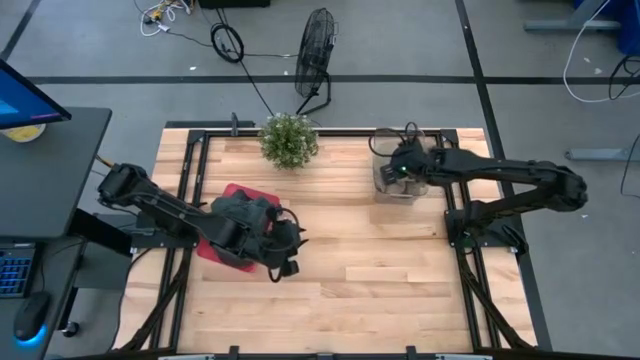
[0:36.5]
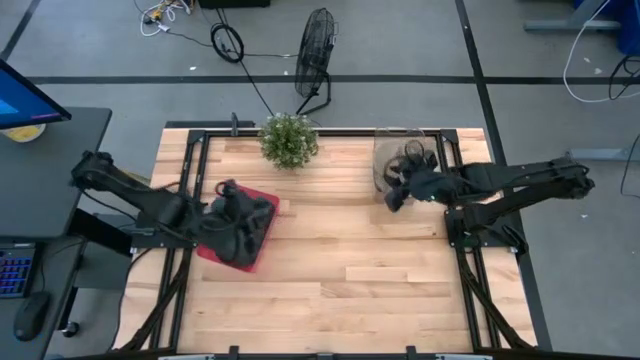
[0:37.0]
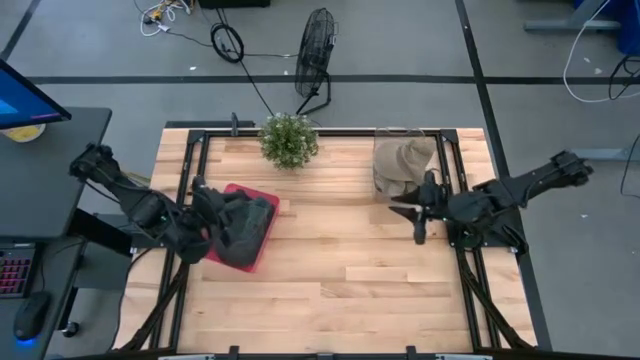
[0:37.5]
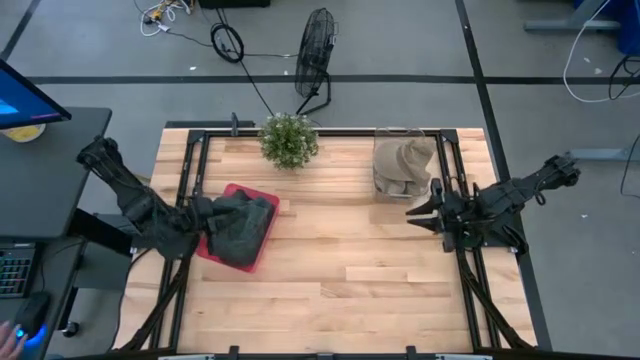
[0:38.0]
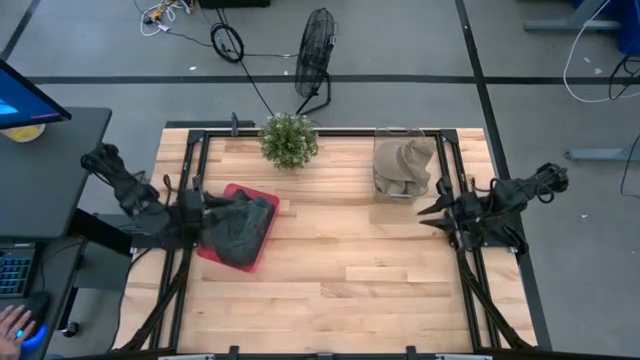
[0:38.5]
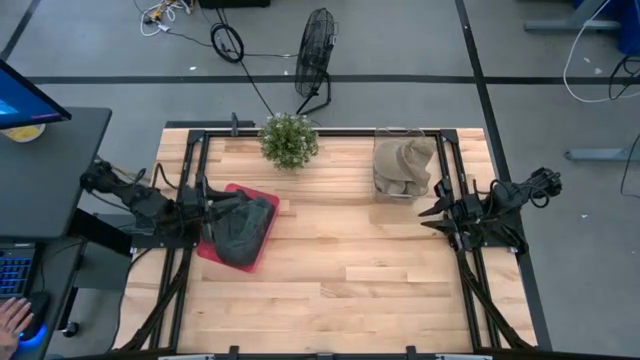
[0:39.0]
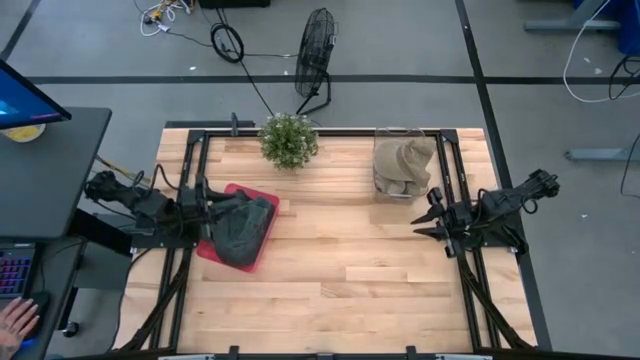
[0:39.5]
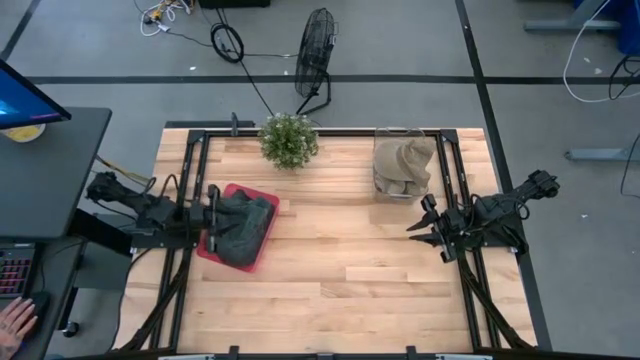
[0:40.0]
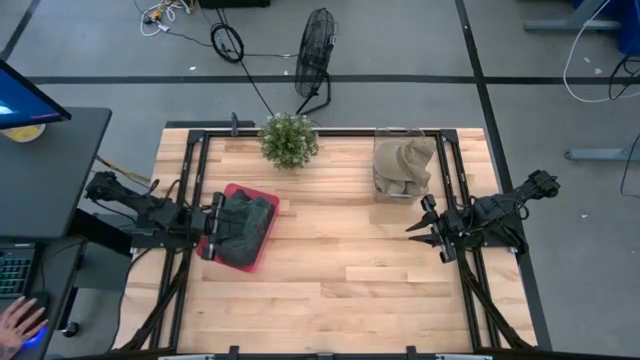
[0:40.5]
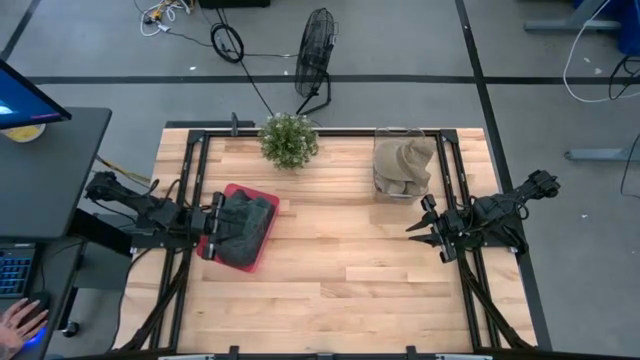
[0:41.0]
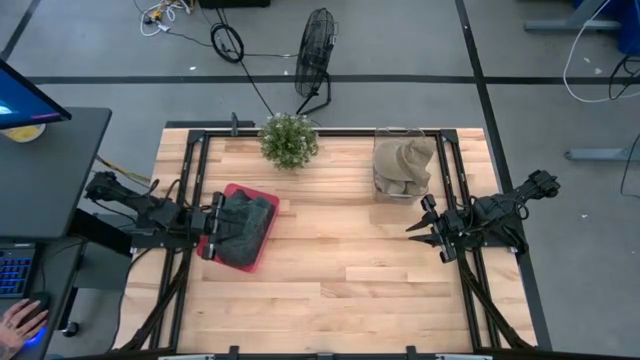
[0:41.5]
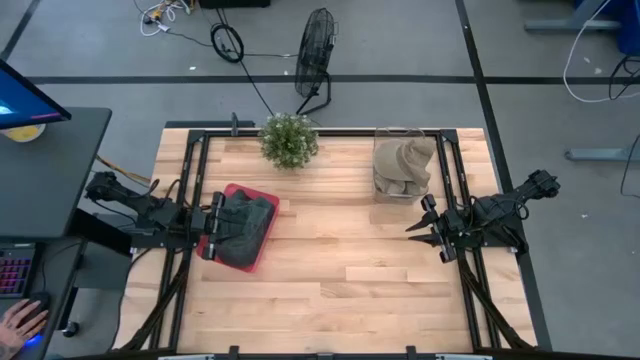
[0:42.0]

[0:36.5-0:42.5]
Task: Pick & Place hat
Return to Home Position

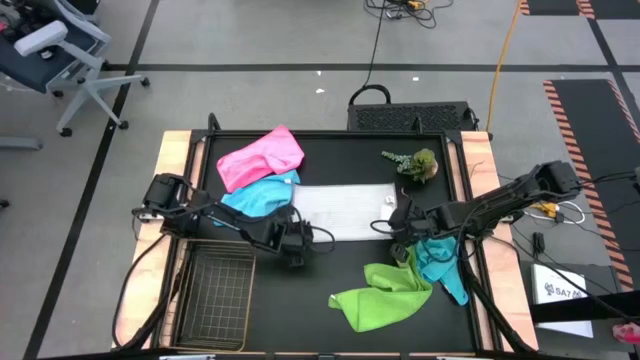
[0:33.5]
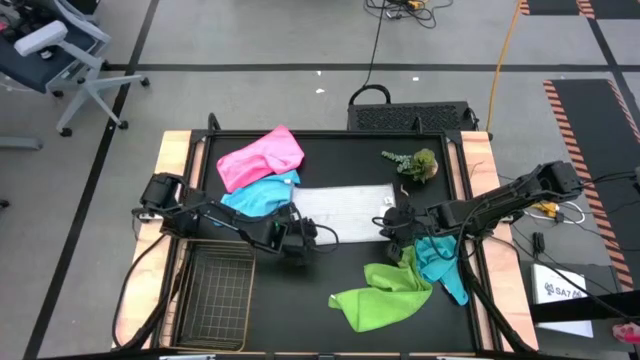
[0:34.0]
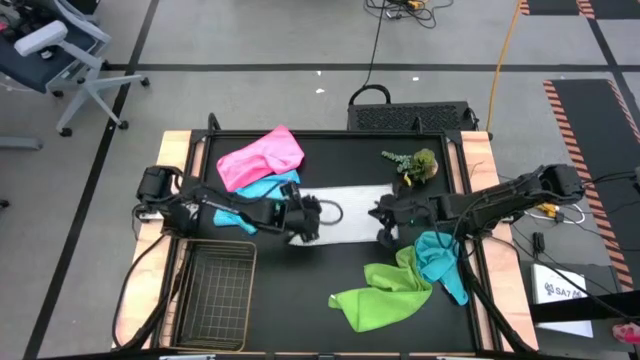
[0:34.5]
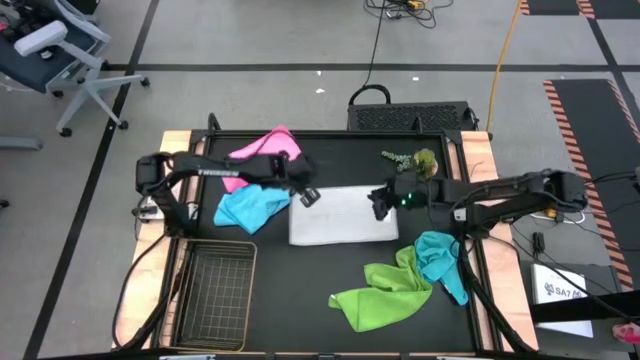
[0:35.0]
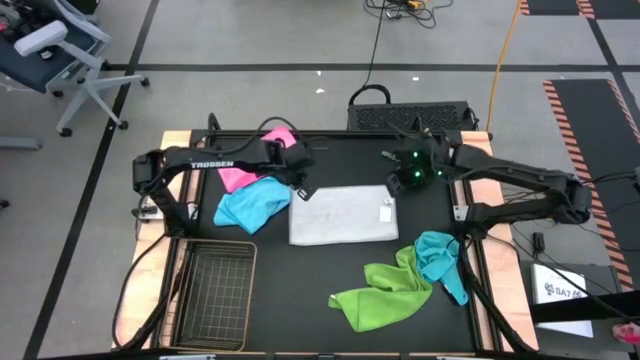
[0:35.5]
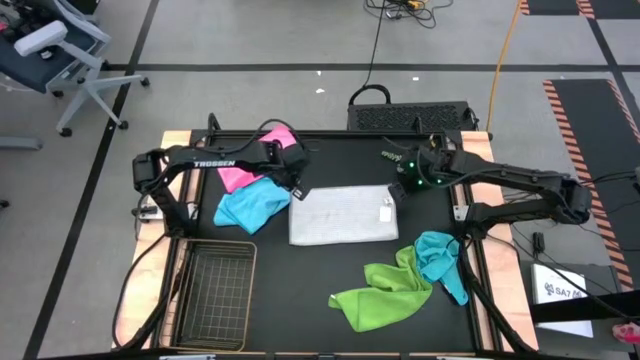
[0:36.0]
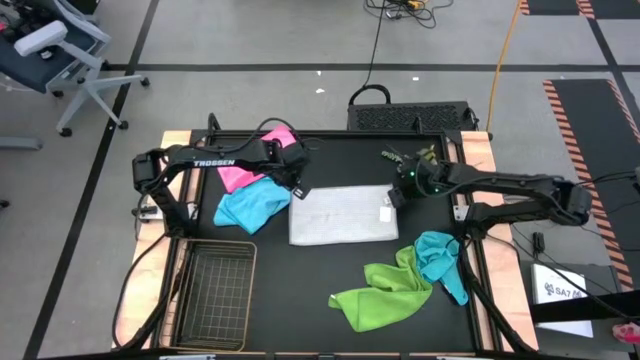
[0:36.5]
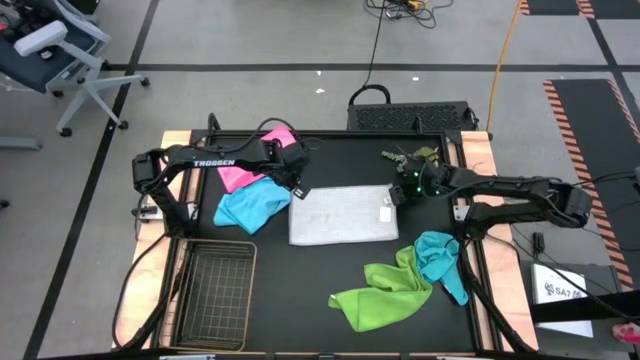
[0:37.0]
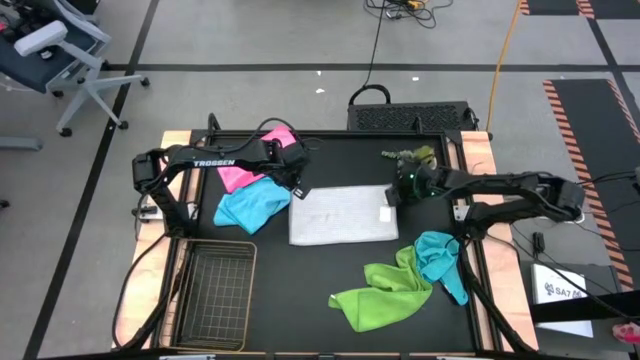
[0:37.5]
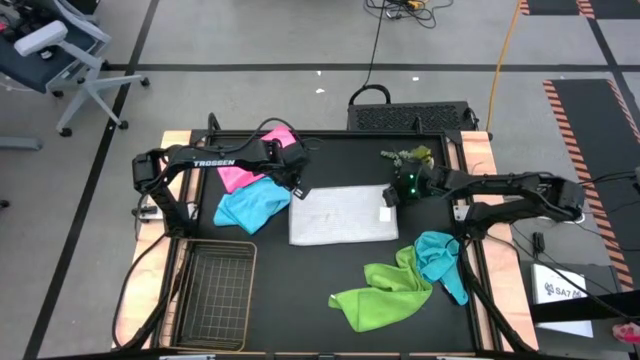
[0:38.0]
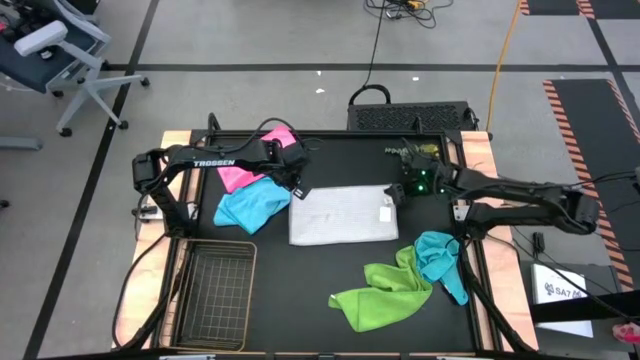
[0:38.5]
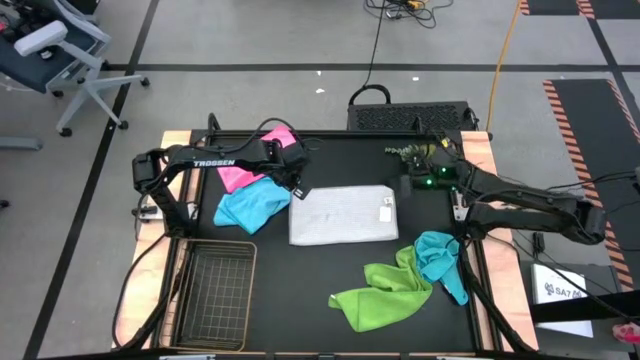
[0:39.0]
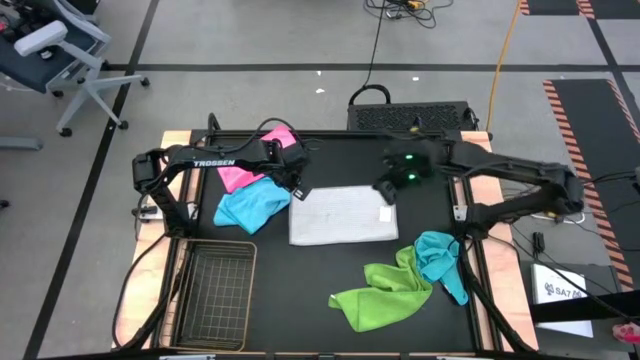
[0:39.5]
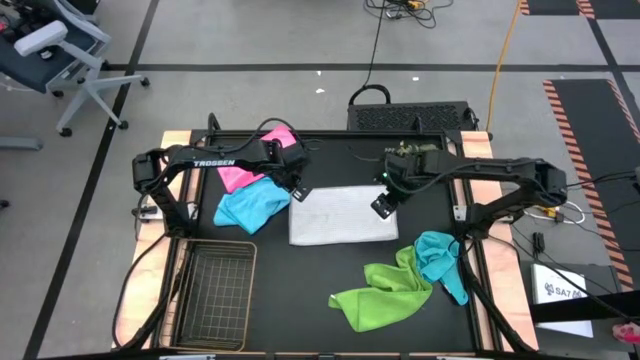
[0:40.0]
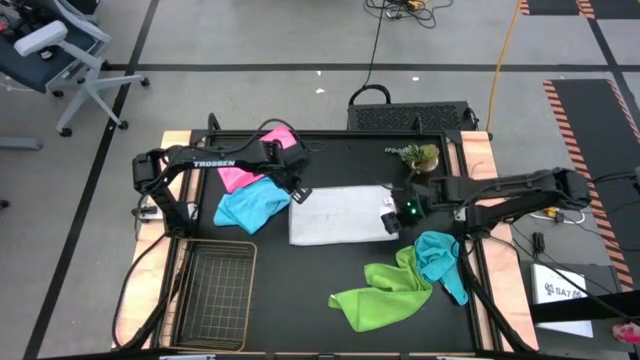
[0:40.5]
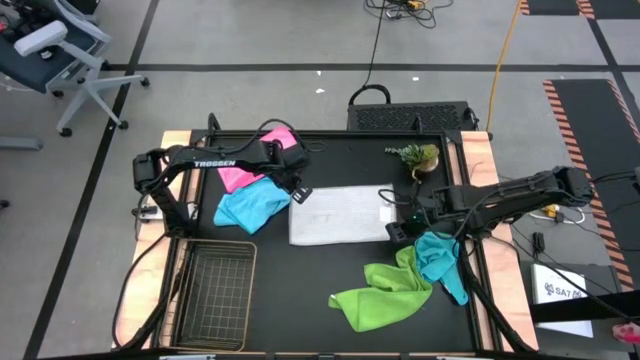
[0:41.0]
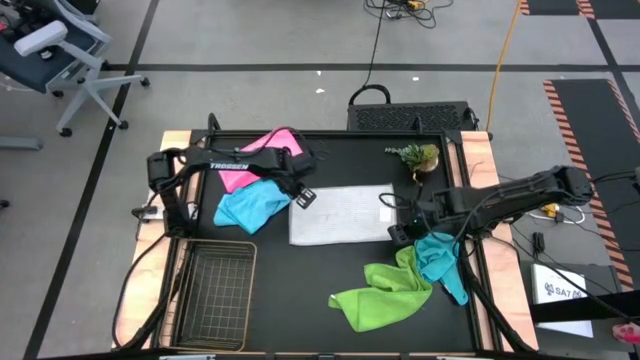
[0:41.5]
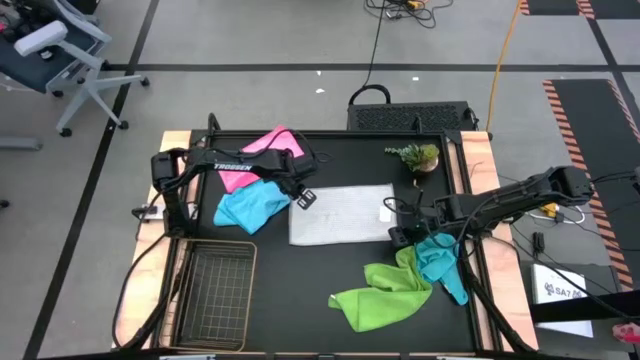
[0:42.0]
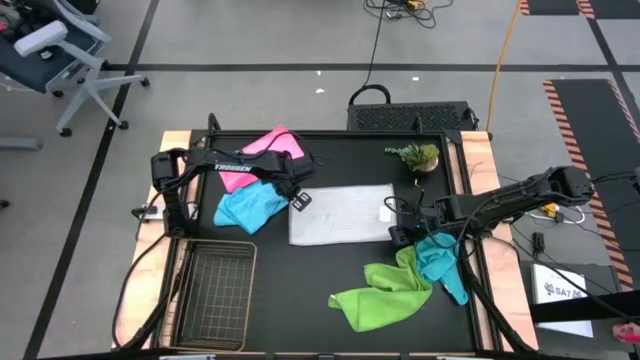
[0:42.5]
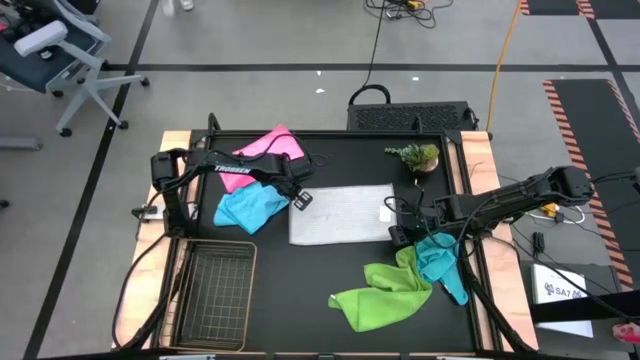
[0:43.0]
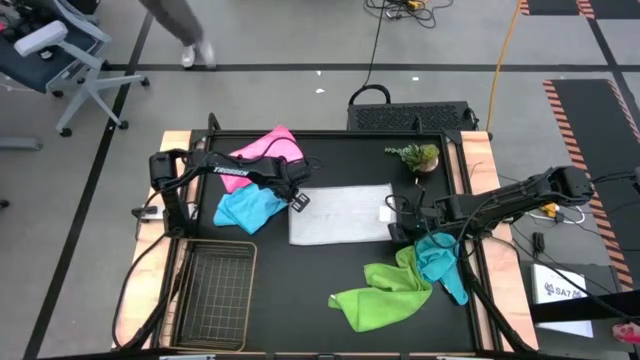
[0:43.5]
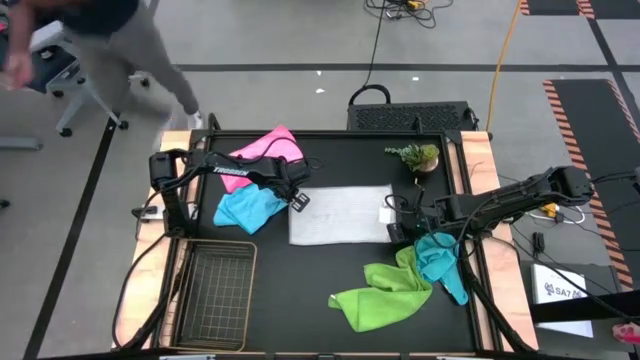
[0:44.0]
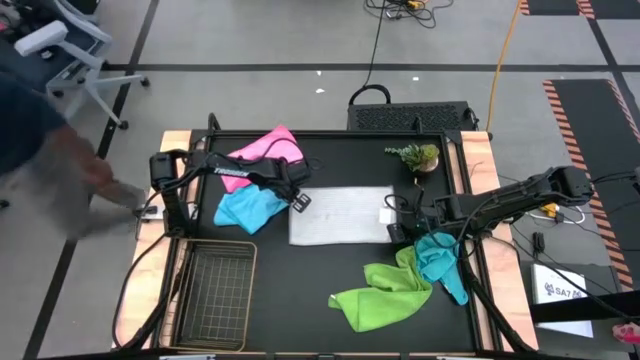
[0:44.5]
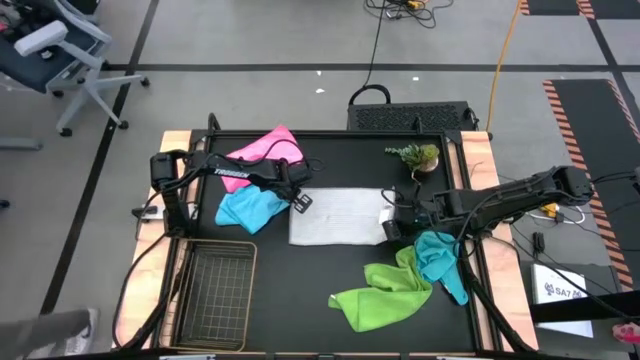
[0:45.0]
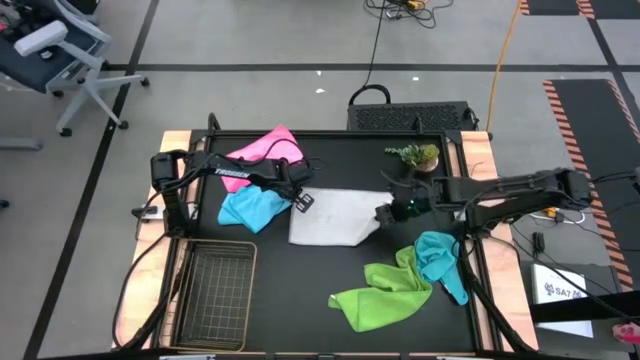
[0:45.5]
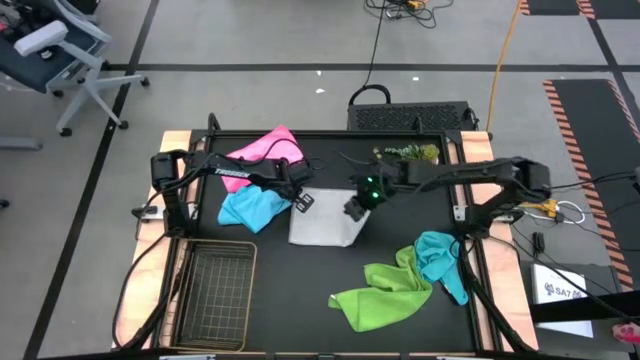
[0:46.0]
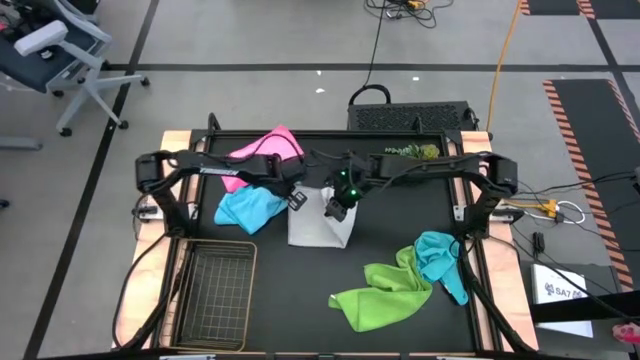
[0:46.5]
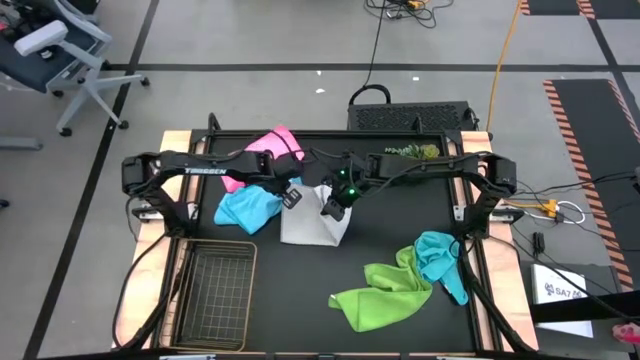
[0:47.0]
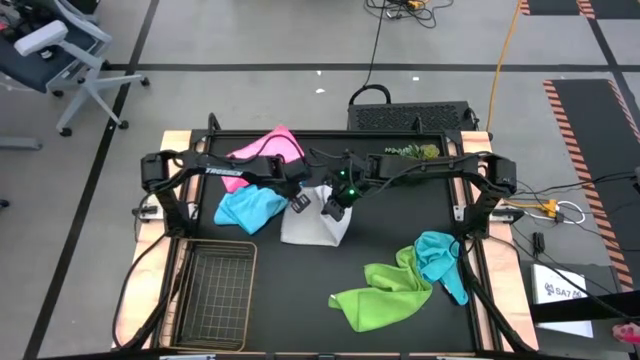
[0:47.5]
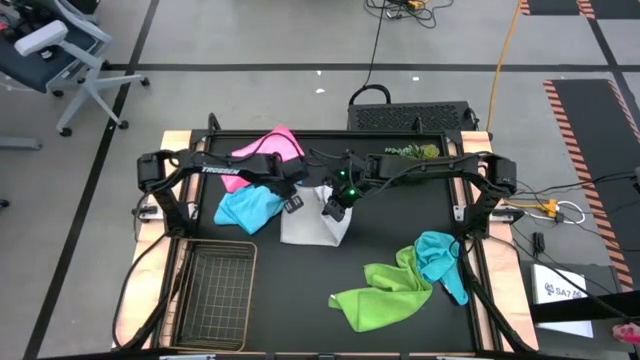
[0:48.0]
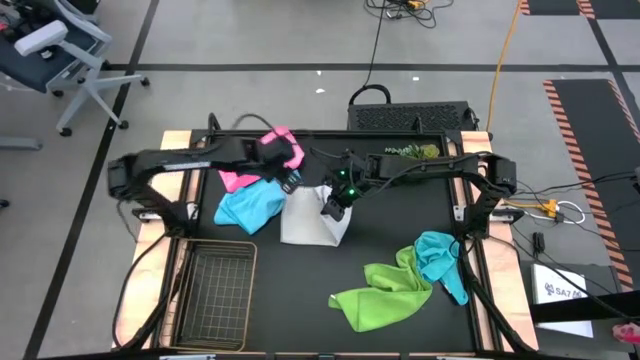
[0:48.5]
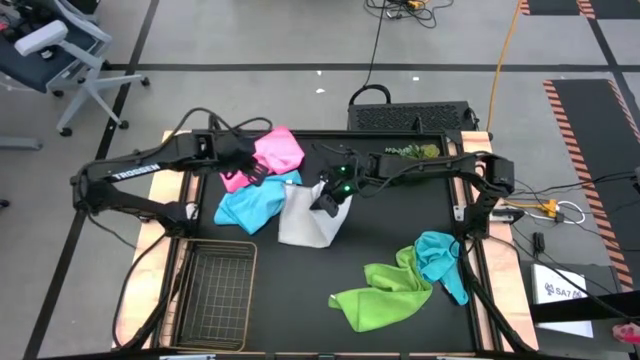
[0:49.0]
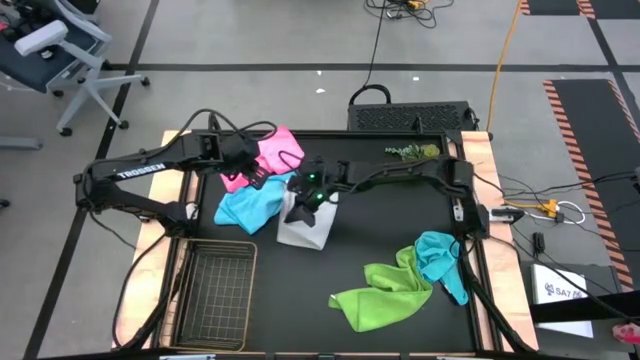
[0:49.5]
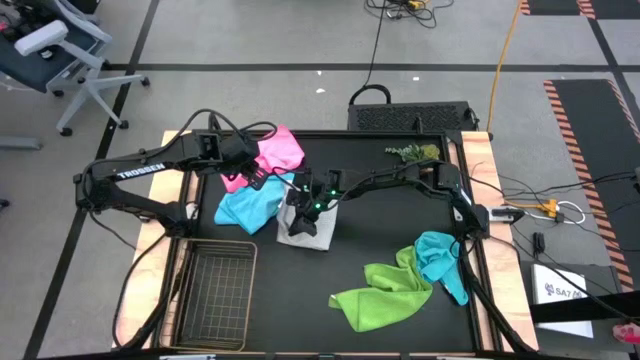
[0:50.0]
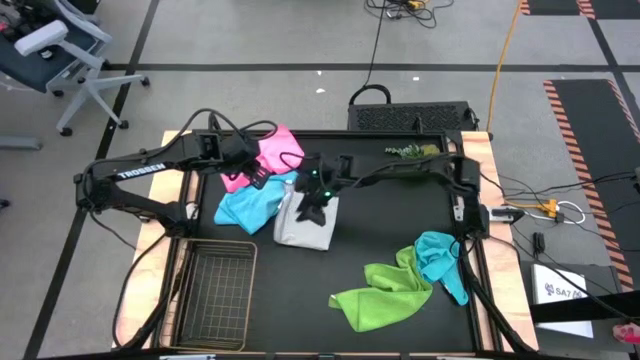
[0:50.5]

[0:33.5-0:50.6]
Task: Fold microfiber towels
Fold the gray microfiber cloth
